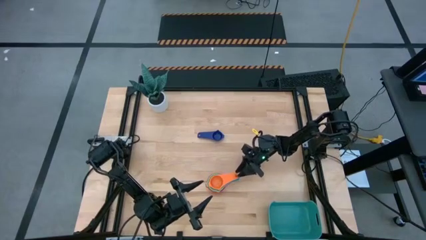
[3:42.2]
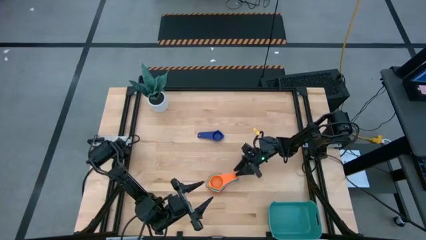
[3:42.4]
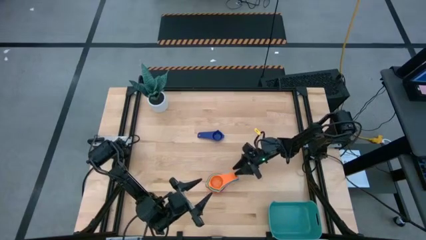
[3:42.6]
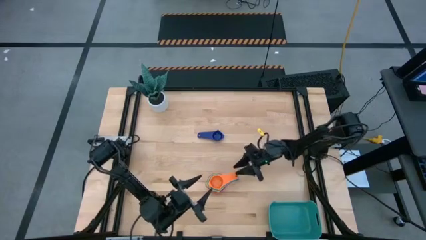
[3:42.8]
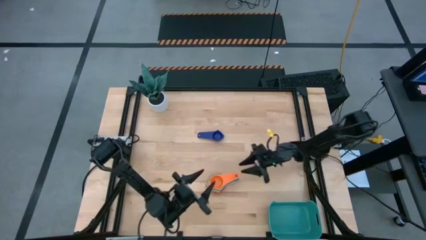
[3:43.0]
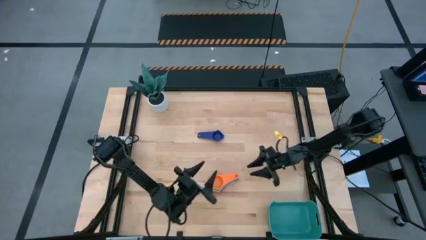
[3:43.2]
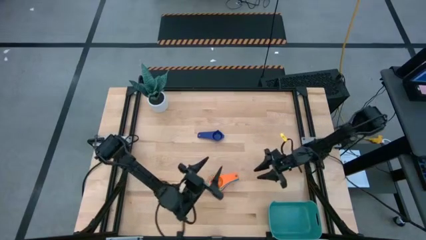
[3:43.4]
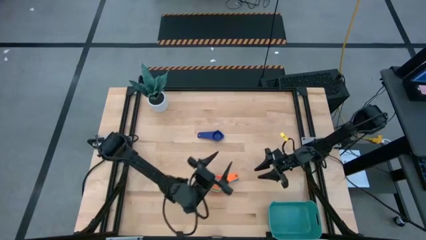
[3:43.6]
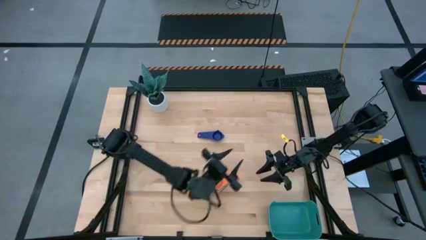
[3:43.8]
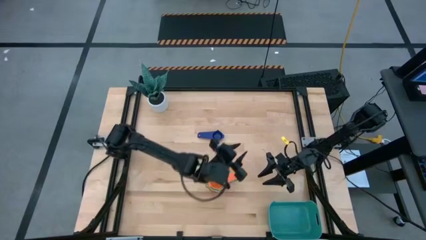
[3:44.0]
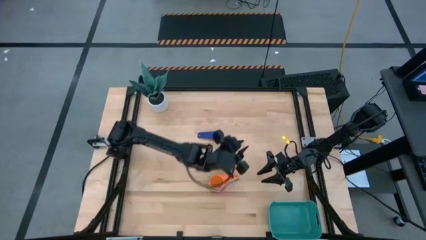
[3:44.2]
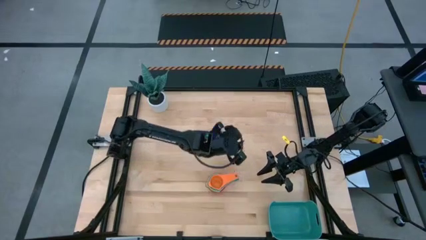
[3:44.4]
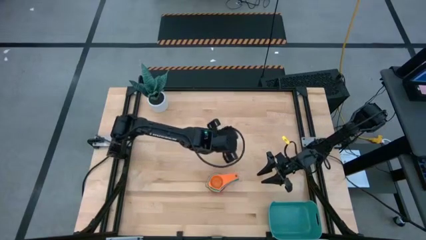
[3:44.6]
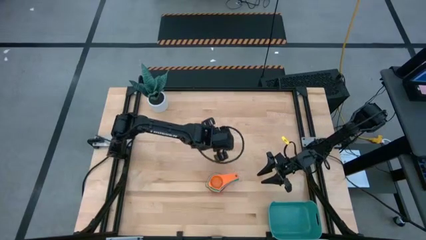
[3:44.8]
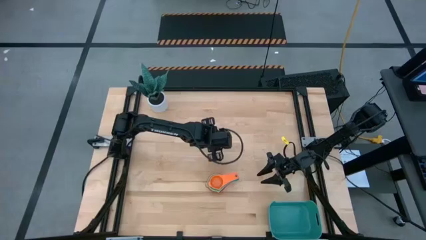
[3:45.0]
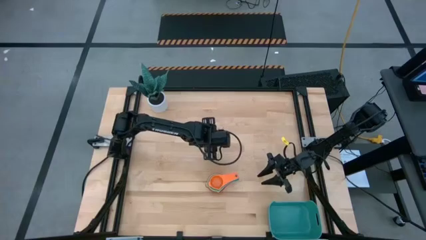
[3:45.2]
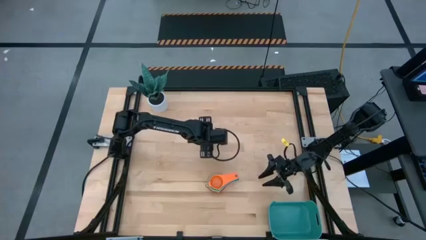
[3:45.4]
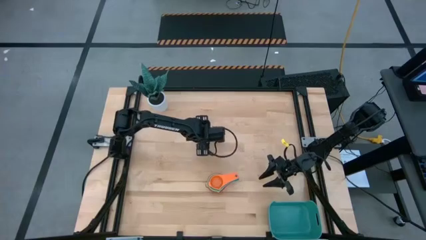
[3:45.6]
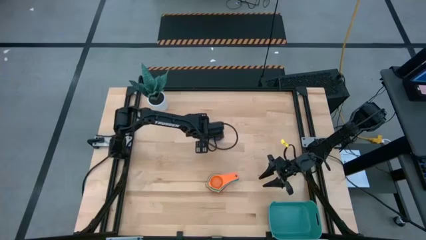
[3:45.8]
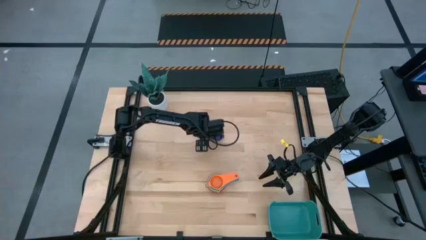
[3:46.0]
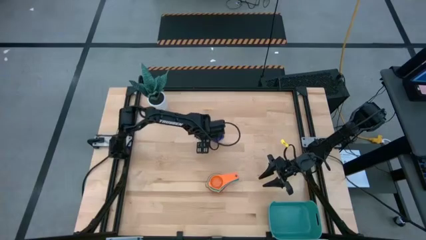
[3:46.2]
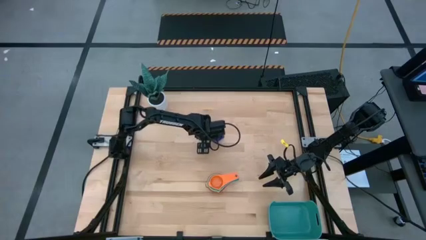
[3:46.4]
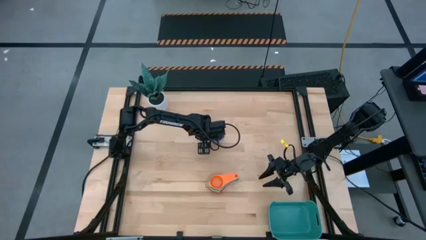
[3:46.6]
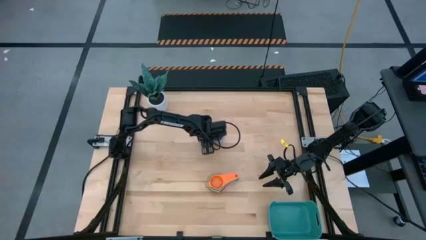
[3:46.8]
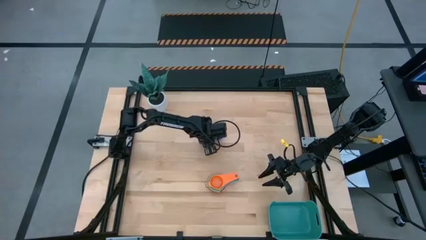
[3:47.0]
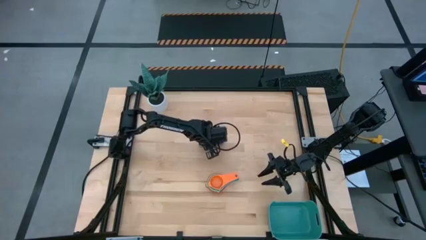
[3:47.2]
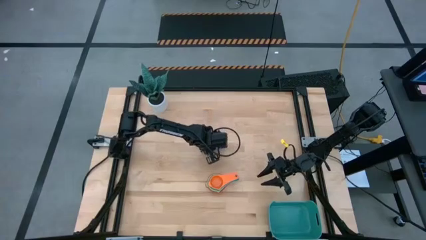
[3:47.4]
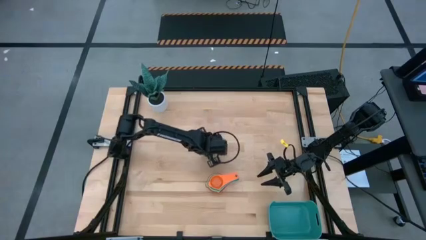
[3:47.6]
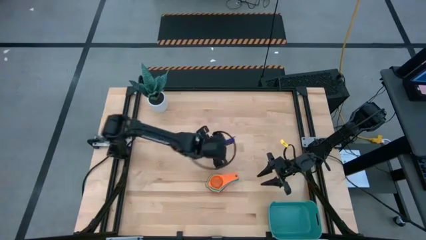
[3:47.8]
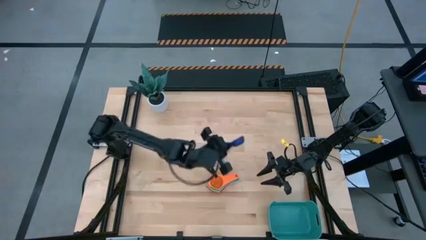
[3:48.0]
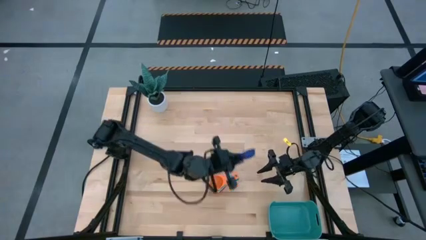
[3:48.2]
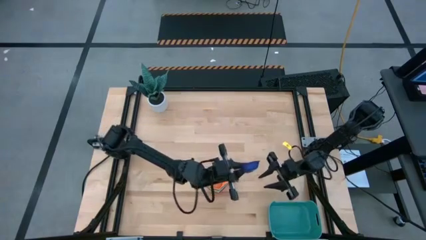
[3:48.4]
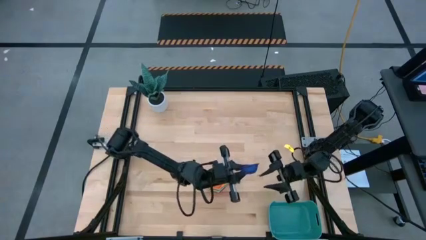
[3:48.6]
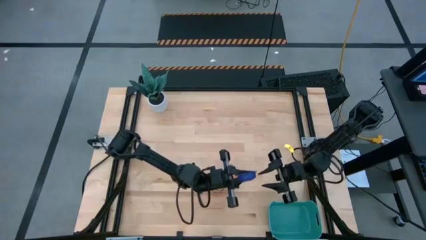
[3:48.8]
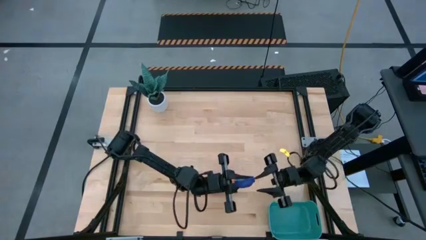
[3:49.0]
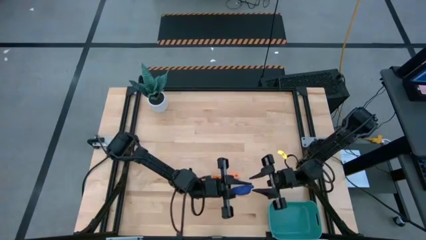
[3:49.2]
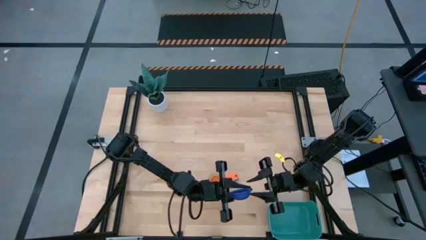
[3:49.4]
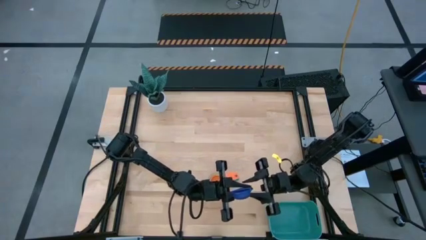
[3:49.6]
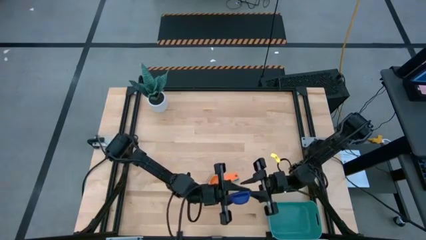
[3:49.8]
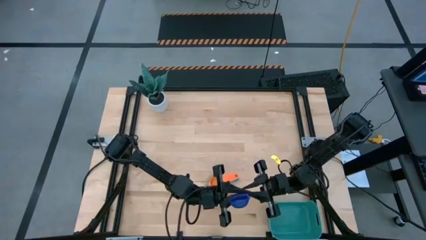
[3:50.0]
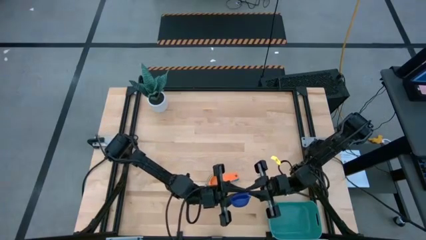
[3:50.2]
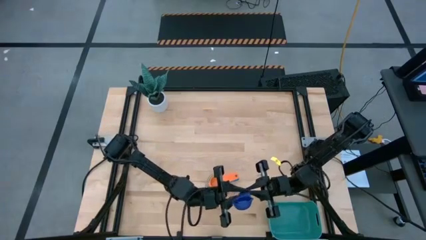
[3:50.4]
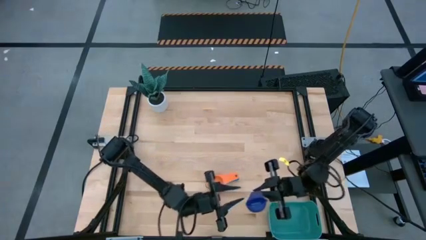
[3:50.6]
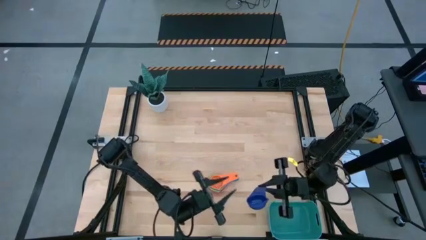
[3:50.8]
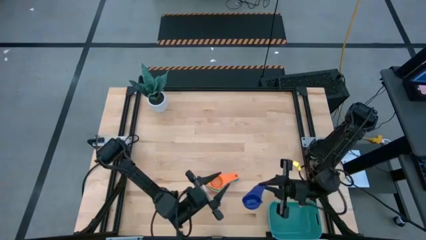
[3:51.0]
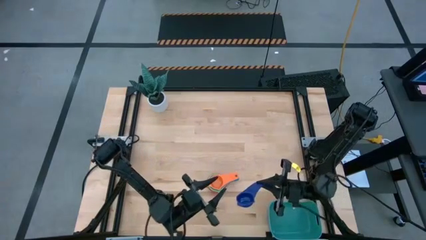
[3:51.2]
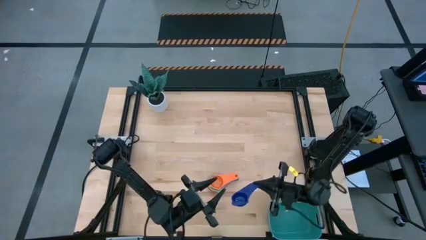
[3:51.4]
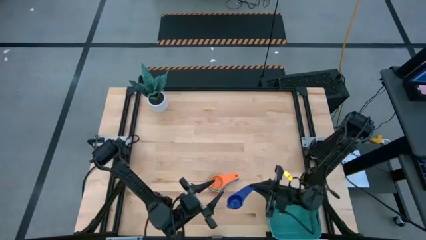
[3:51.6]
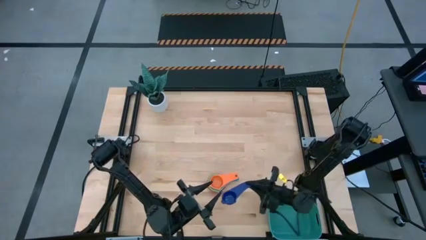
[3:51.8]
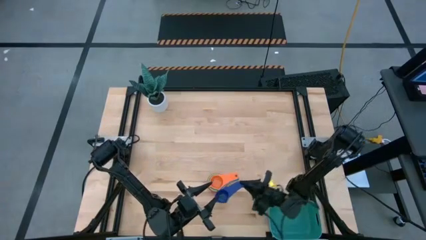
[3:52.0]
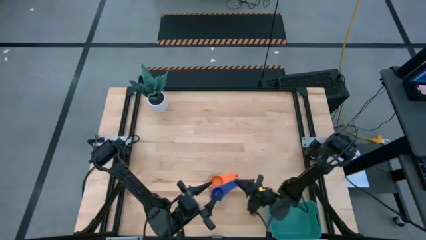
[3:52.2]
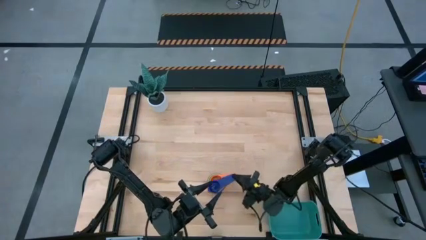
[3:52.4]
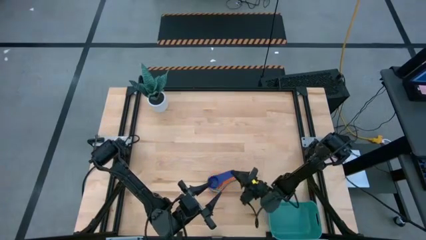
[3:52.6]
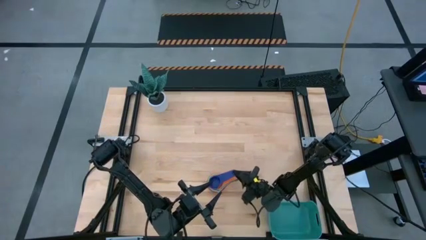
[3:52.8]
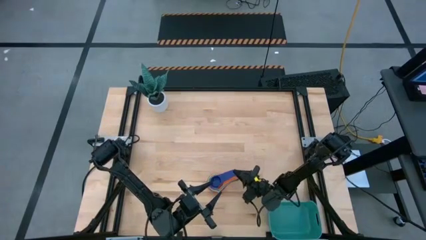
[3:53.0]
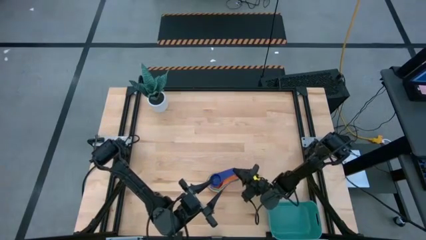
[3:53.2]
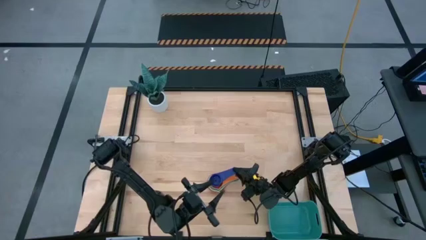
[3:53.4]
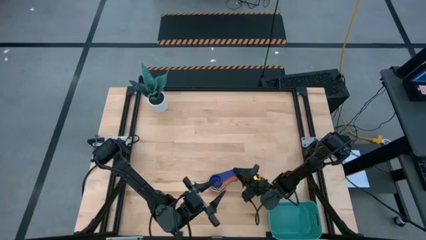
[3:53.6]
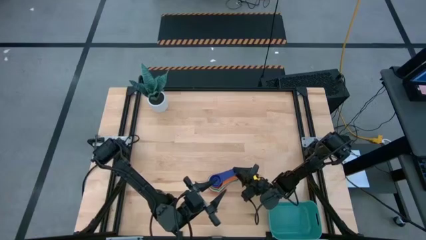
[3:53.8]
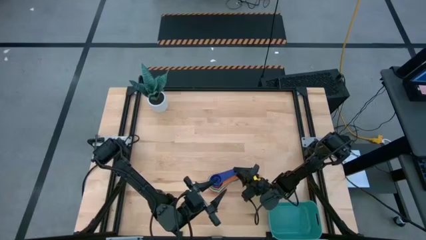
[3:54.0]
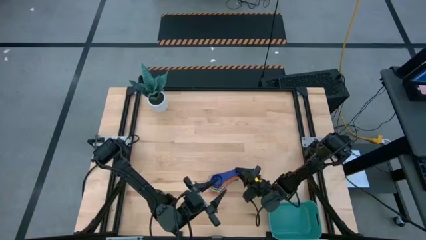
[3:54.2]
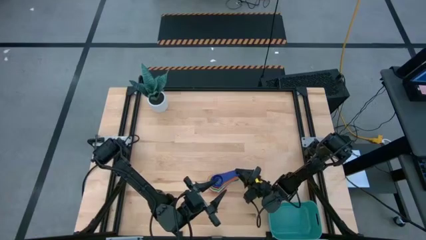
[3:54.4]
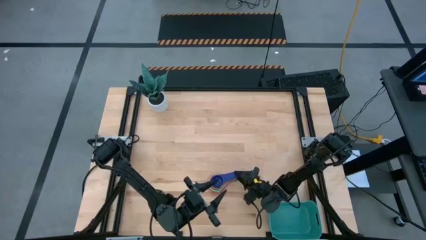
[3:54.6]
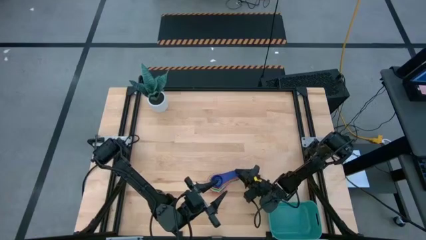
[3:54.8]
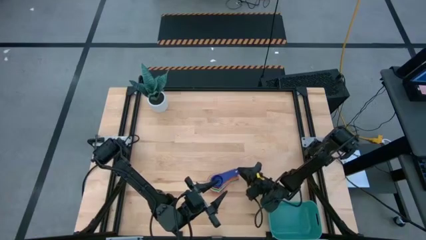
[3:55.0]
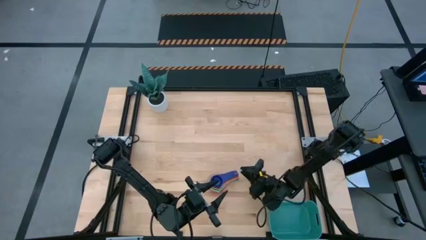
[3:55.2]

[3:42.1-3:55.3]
Task: Nest measuring cups in basket
Stack the dark blue measuring cup on top of the orange measuring cup

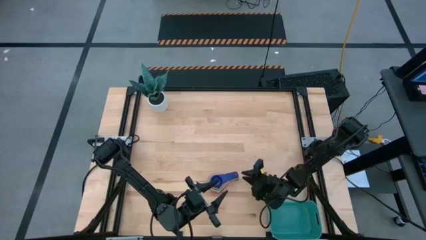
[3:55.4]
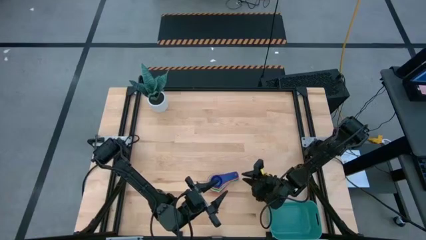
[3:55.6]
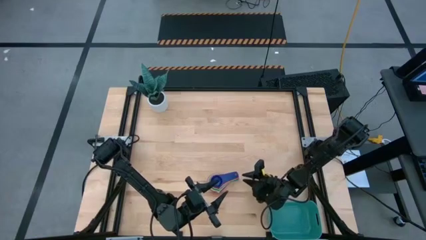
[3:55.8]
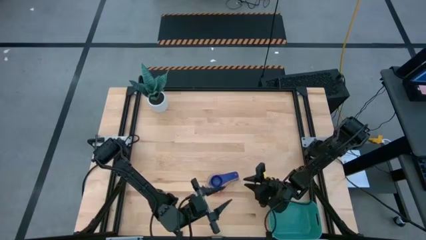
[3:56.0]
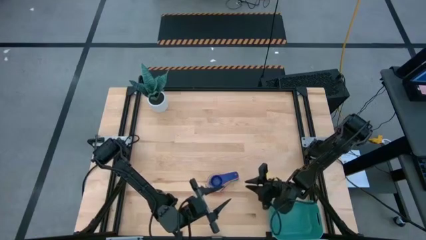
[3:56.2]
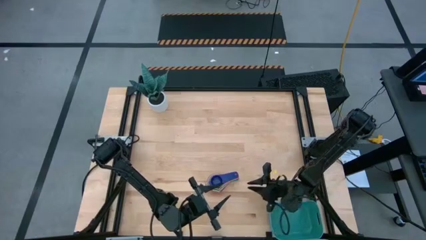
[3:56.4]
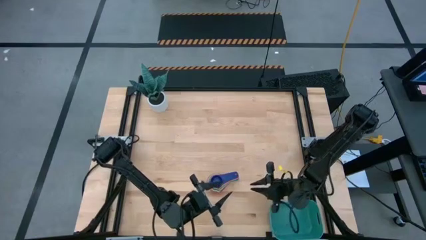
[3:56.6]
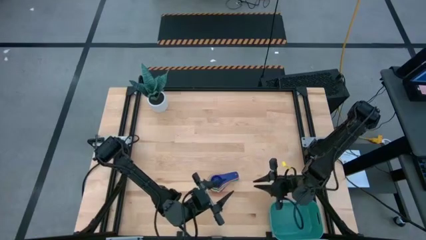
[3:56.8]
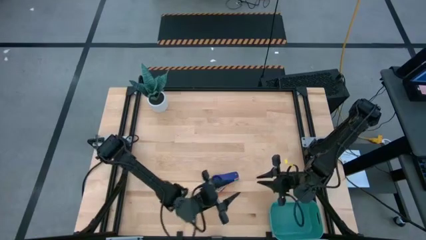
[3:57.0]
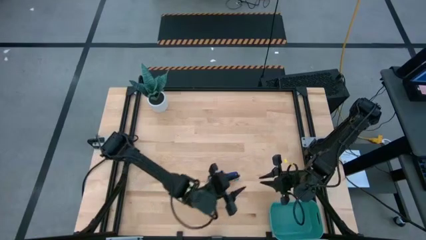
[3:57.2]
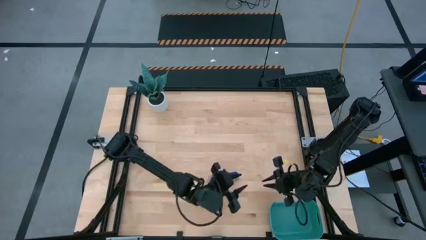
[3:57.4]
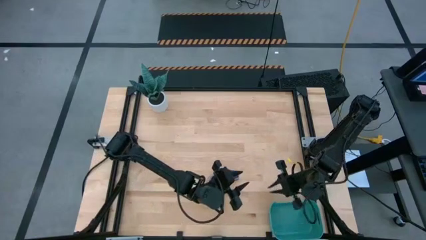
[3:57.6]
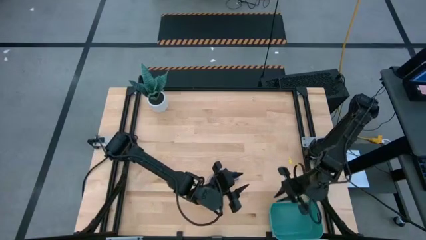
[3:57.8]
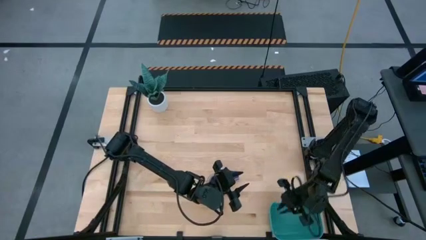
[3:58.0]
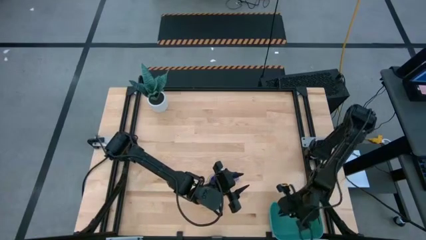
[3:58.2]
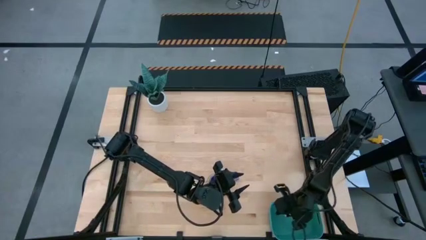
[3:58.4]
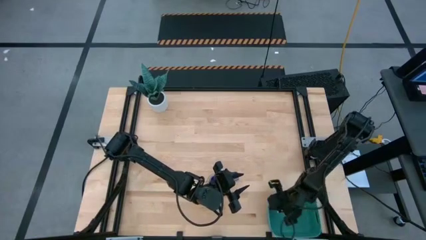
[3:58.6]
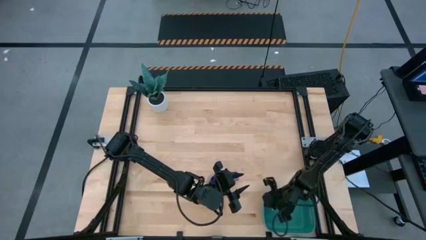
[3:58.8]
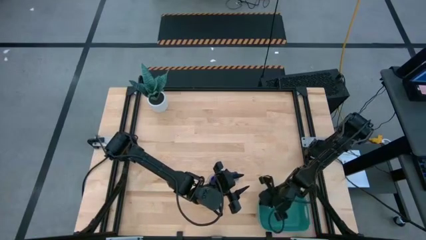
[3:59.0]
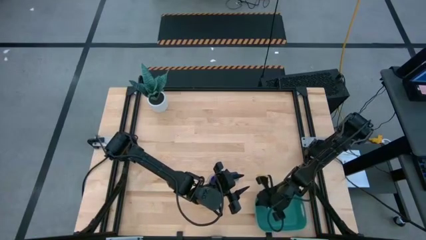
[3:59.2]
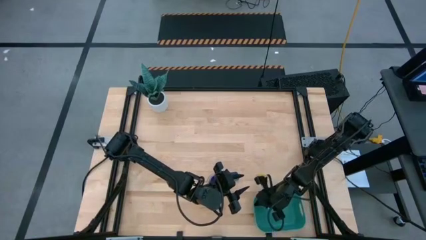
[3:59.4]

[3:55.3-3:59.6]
Adjust the green bin
